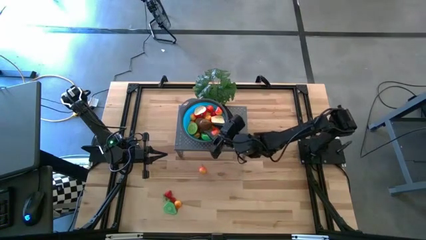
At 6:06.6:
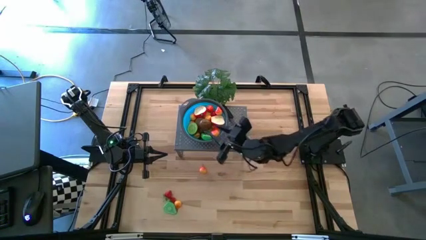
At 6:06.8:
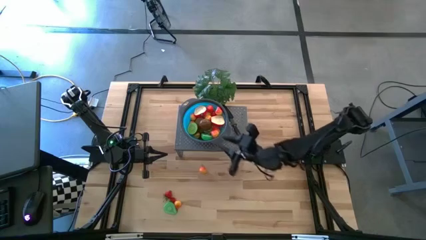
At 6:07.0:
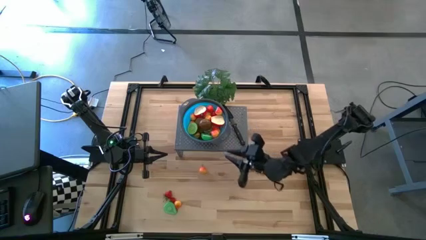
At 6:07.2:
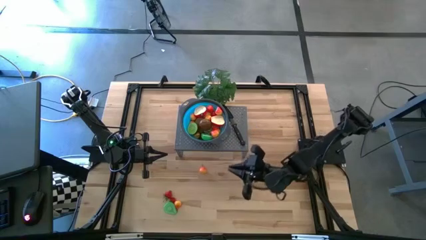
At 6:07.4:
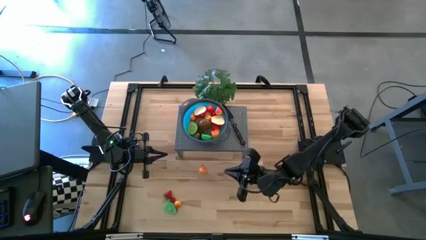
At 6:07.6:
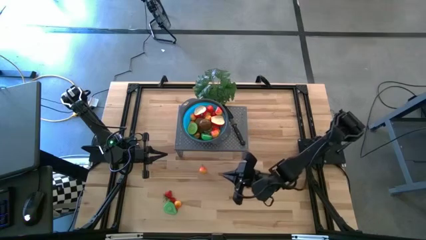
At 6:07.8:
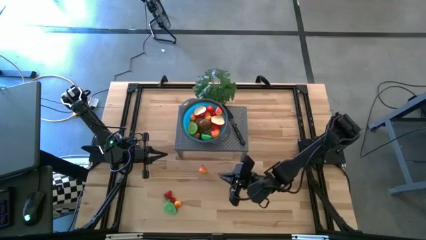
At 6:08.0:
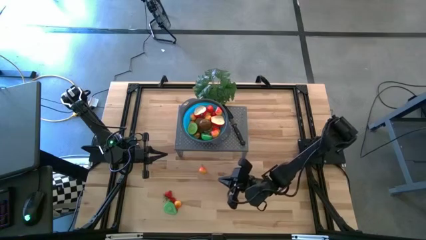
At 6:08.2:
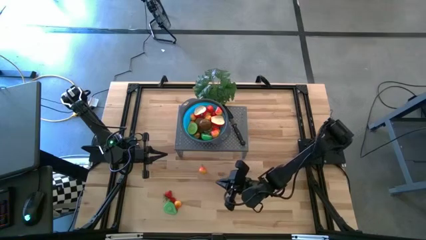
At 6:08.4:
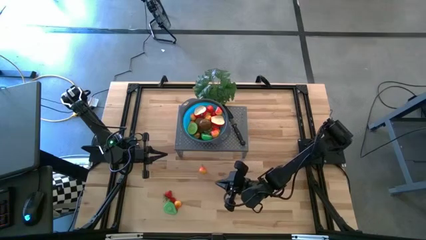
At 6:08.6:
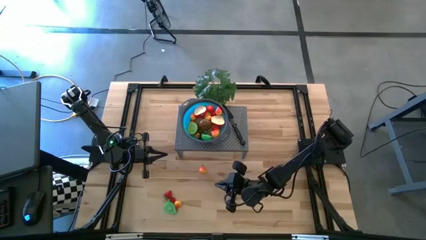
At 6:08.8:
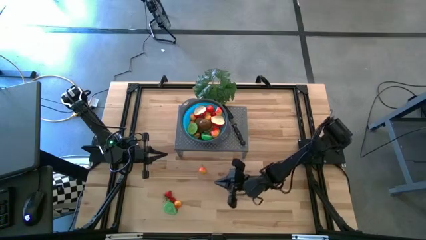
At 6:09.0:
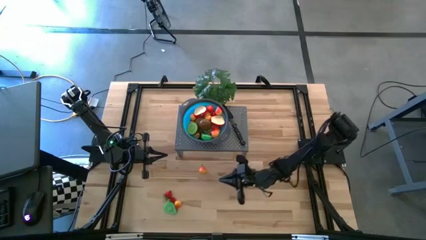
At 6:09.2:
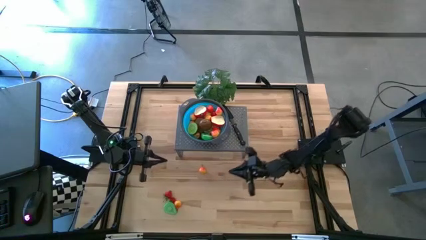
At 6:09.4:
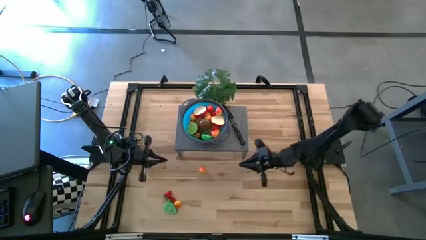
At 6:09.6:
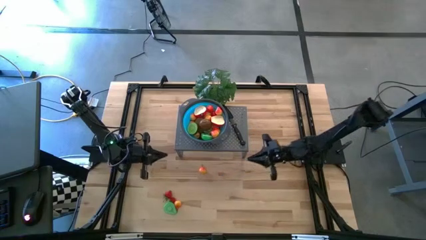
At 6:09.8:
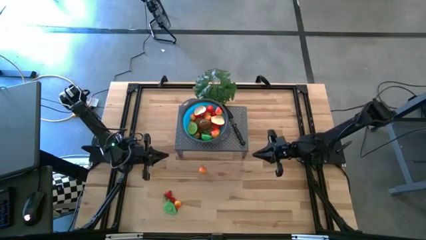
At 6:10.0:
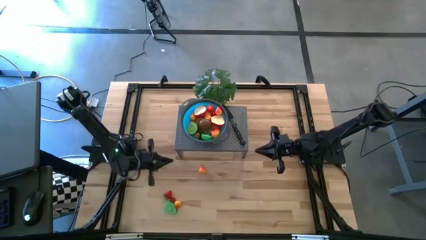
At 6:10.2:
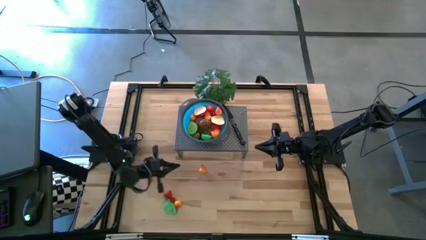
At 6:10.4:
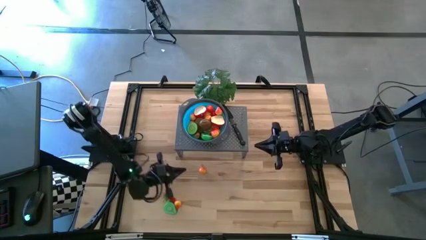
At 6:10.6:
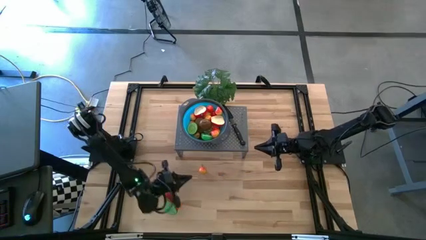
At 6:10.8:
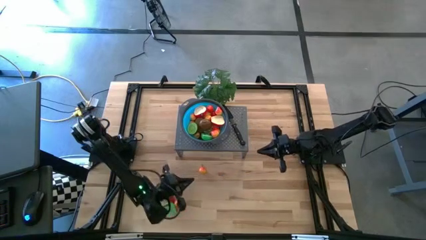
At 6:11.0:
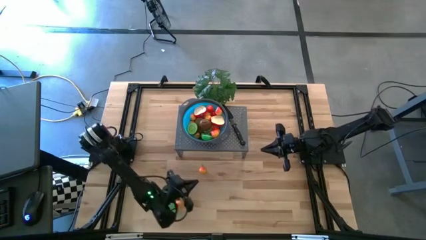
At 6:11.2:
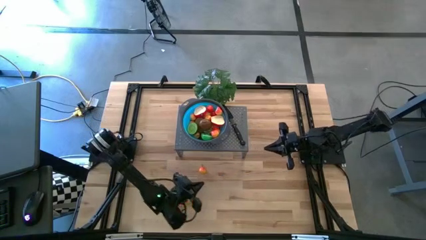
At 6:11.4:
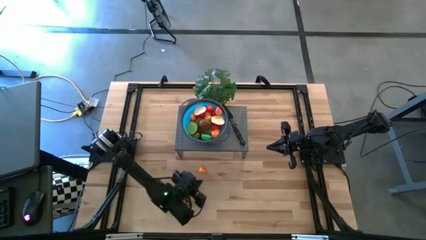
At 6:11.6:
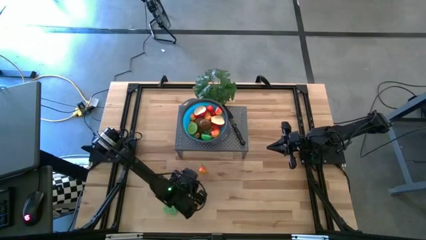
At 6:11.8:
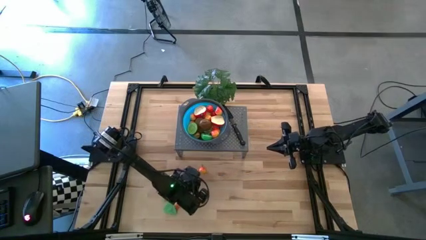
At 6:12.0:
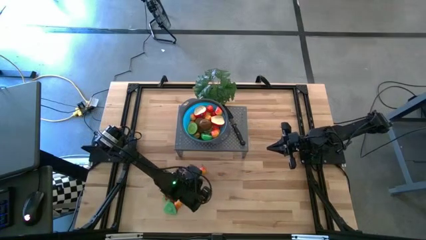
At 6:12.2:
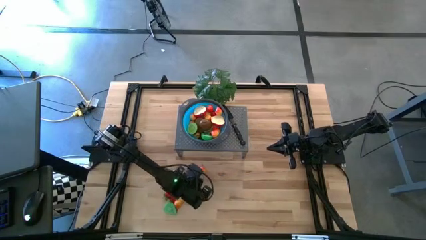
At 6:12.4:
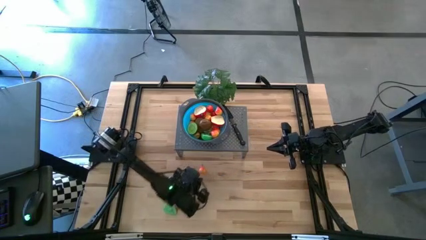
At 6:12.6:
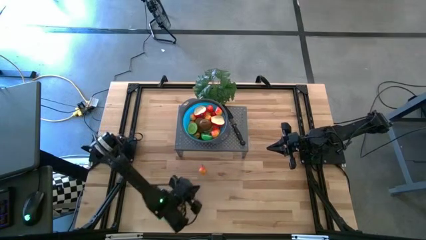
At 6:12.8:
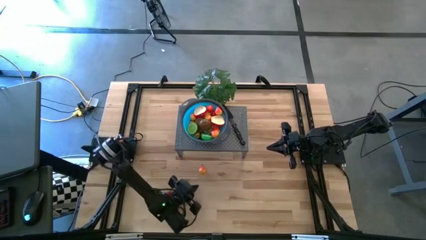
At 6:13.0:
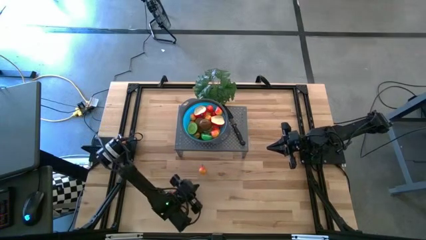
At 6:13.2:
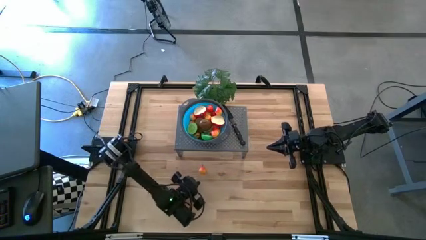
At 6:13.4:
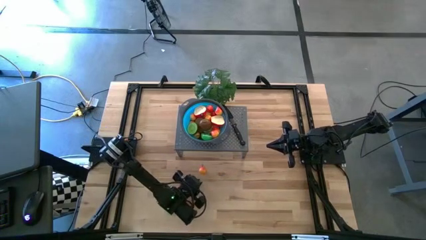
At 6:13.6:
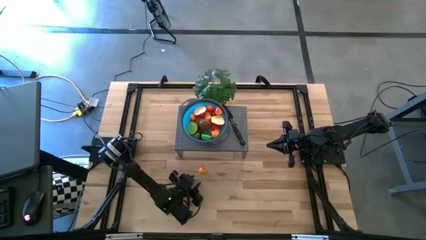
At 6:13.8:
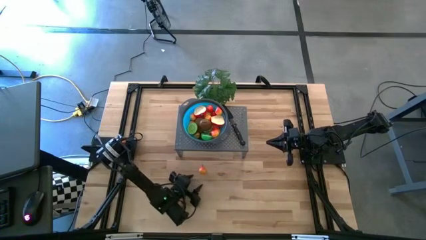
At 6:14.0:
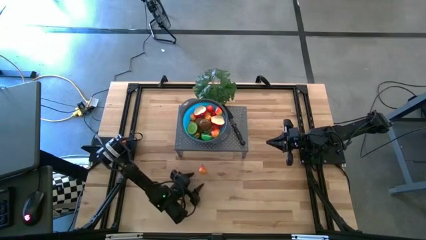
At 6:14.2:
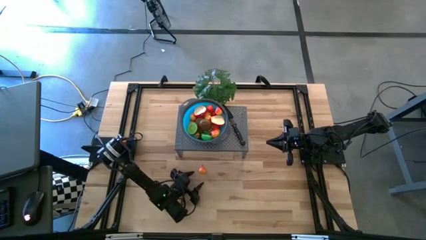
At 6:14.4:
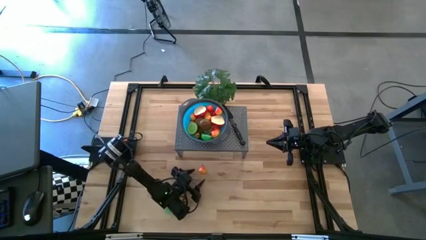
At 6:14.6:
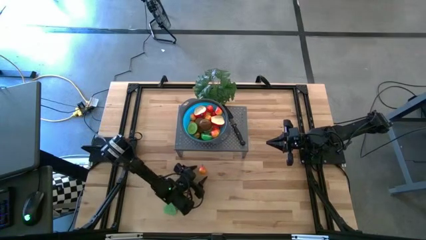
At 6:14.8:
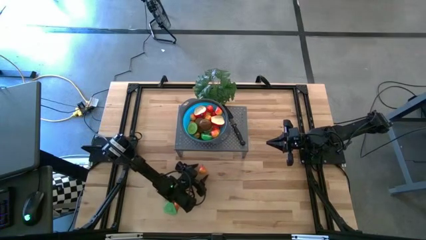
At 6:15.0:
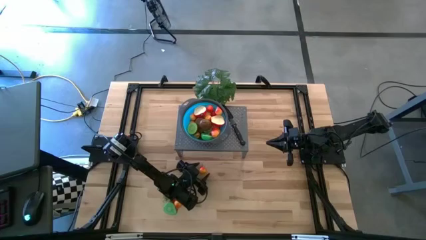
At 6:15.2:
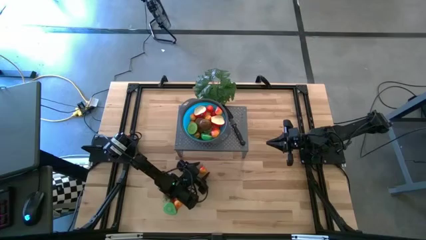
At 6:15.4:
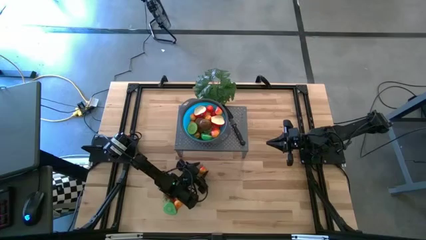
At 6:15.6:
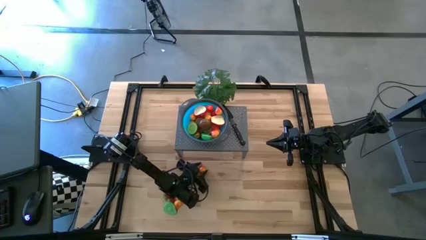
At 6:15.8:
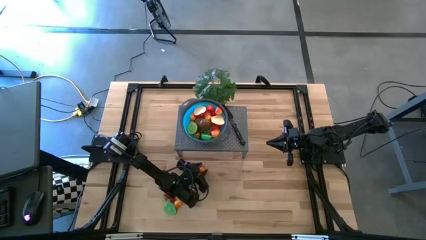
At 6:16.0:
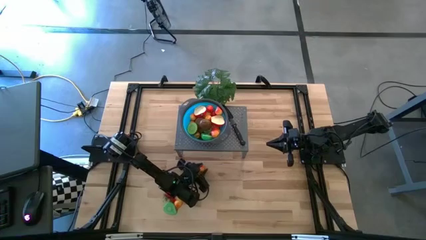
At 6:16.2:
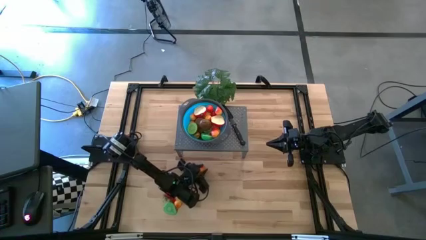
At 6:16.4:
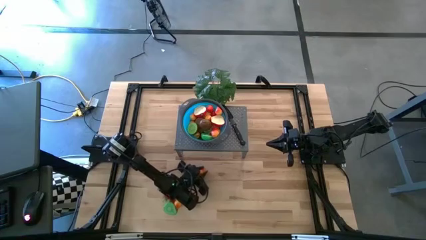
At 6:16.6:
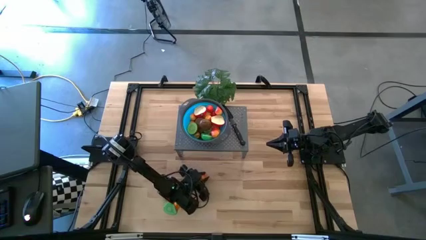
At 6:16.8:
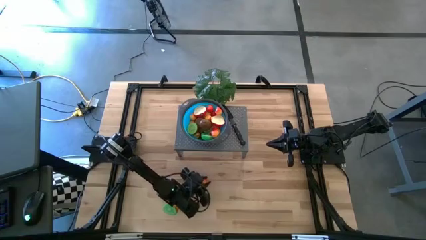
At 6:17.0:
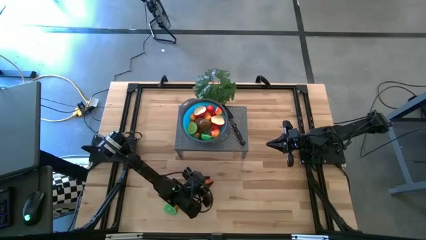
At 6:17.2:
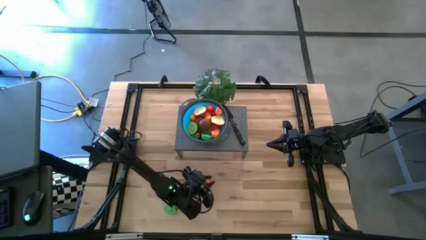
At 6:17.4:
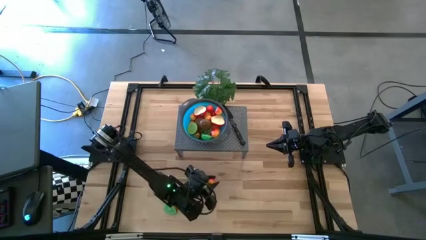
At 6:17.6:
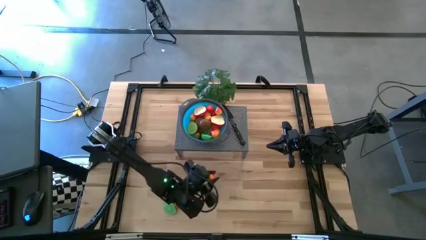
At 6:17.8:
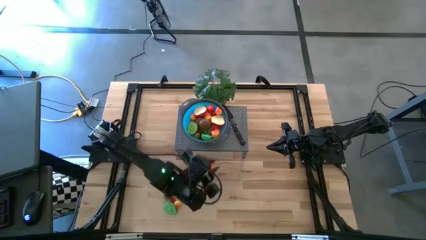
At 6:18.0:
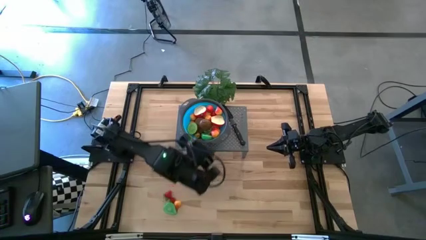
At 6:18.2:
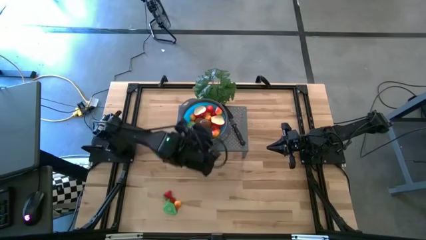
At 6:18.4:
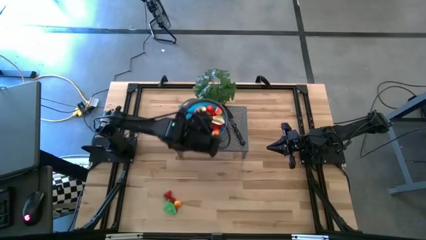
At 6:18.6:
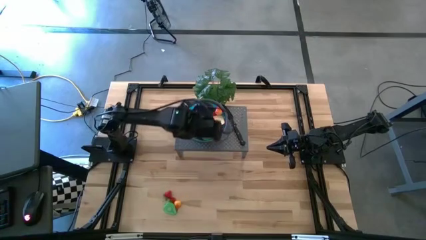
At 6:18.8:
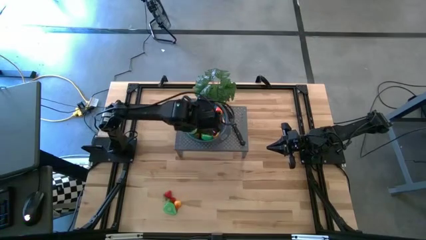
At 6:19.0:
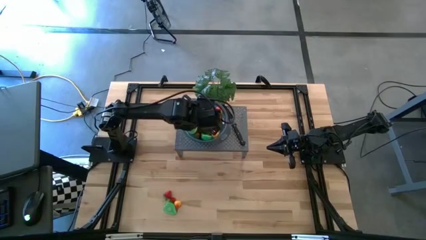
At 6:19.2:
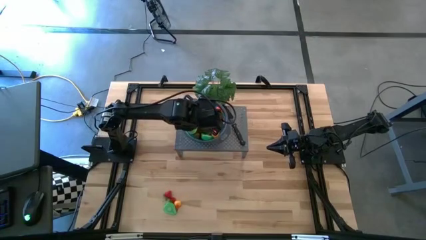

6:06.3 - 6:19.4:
Task: Pick & Place Fruit
Put the pear into the blue strainer bowl on the shelf
